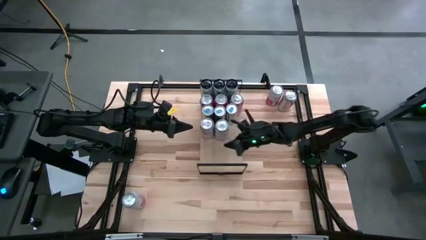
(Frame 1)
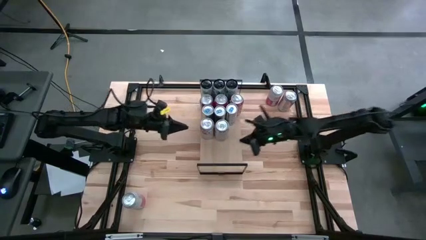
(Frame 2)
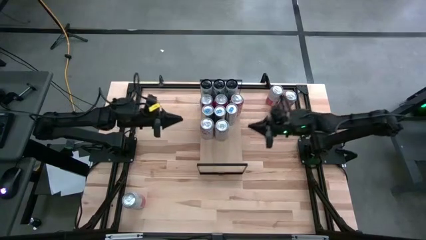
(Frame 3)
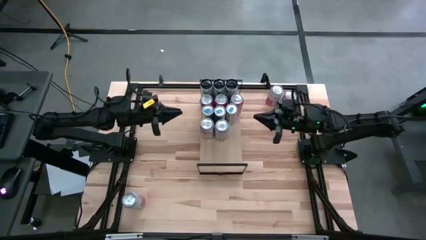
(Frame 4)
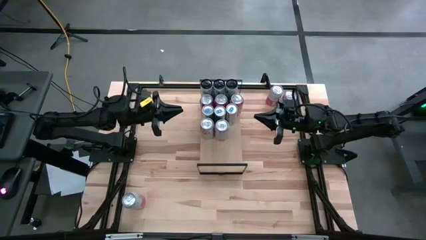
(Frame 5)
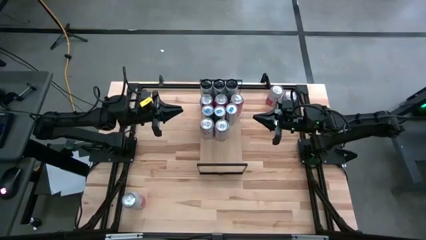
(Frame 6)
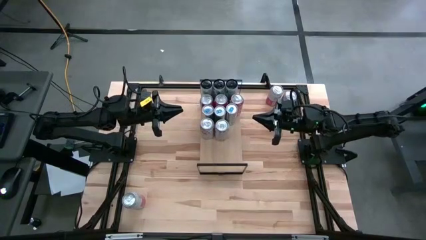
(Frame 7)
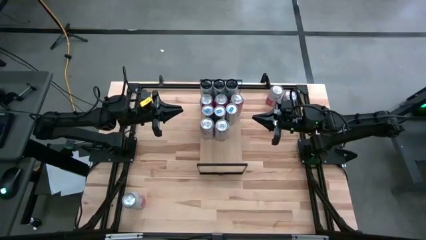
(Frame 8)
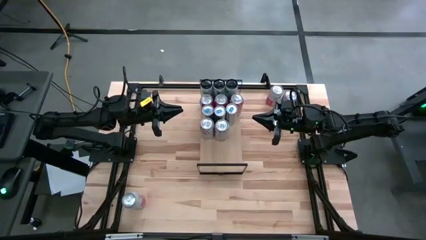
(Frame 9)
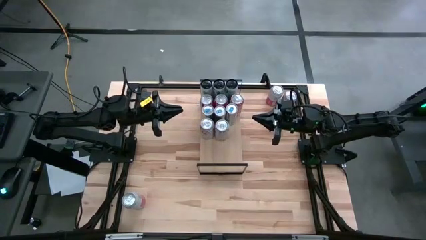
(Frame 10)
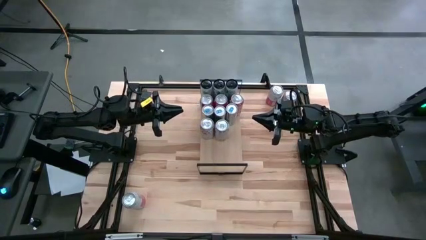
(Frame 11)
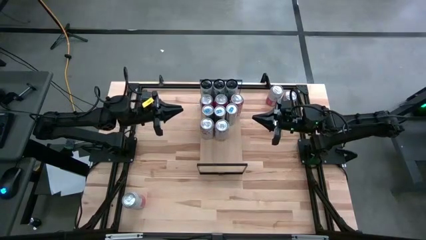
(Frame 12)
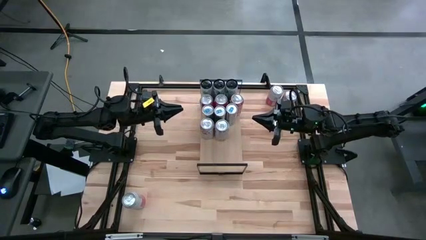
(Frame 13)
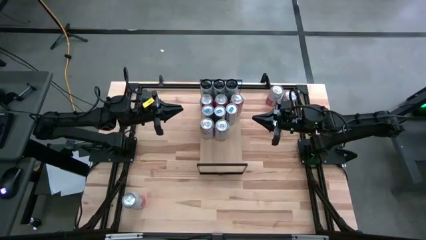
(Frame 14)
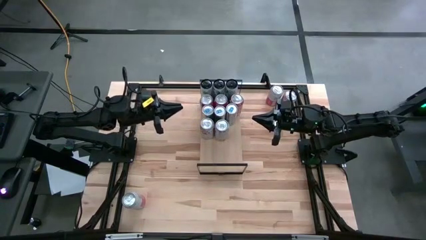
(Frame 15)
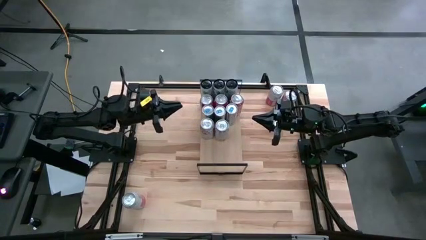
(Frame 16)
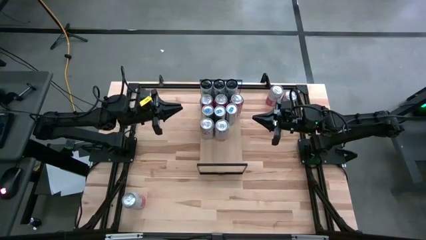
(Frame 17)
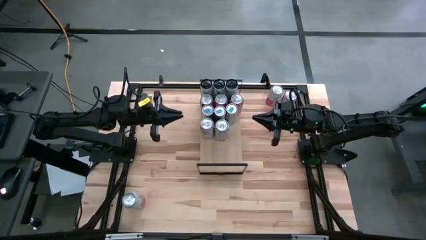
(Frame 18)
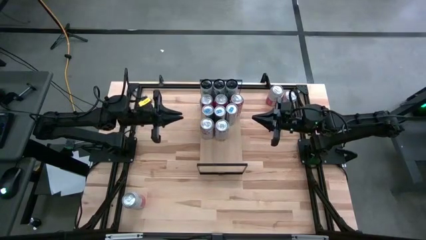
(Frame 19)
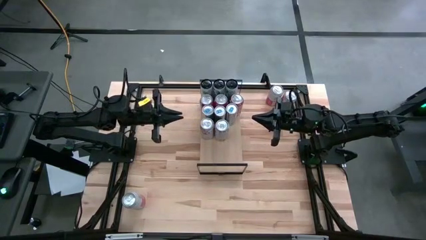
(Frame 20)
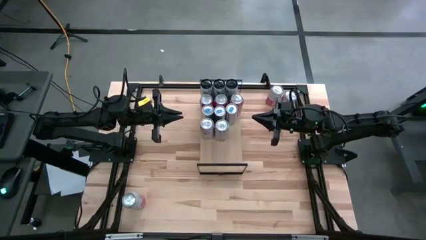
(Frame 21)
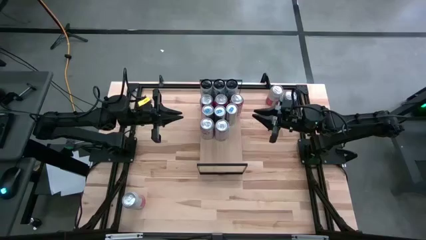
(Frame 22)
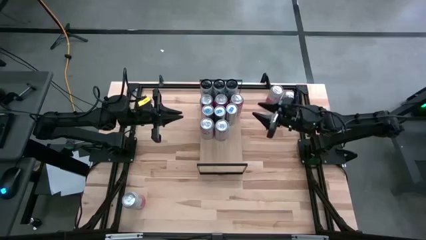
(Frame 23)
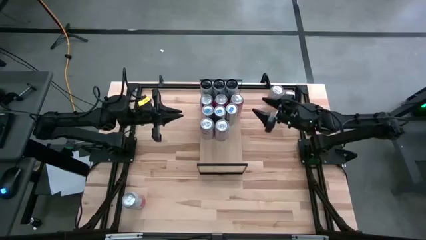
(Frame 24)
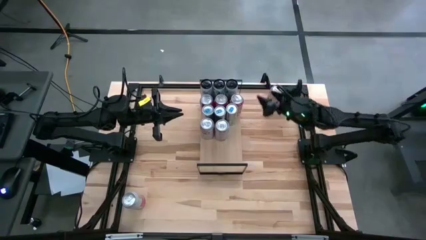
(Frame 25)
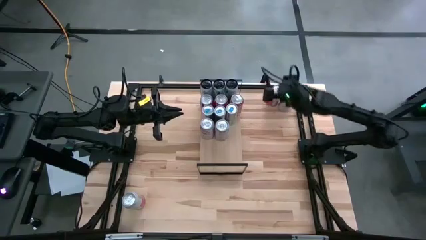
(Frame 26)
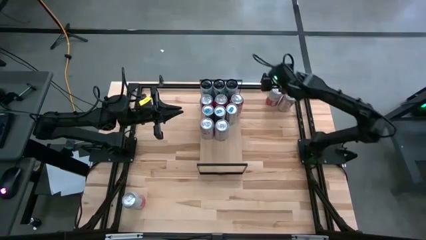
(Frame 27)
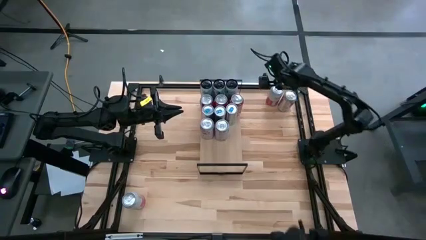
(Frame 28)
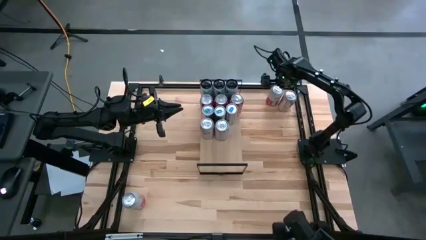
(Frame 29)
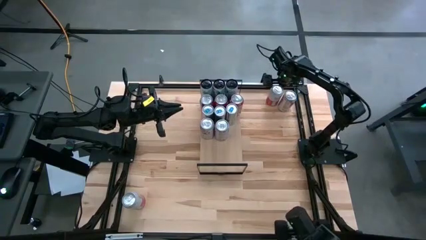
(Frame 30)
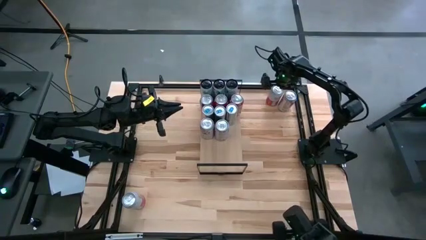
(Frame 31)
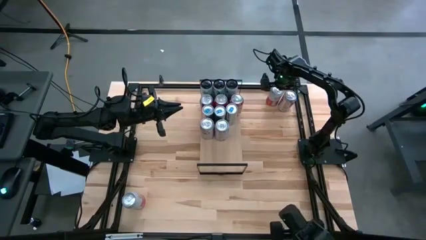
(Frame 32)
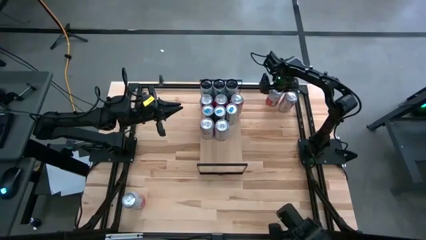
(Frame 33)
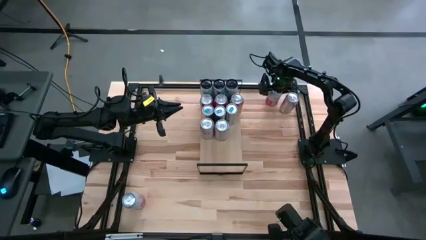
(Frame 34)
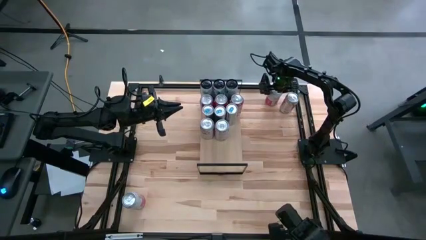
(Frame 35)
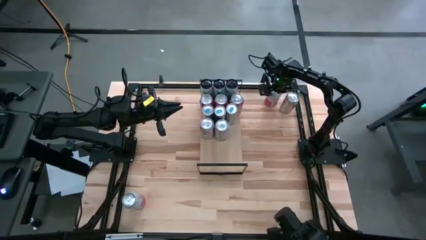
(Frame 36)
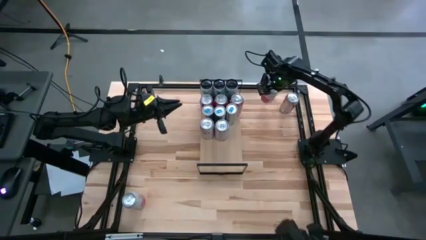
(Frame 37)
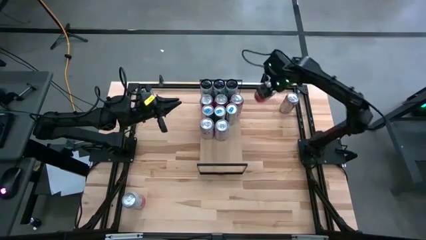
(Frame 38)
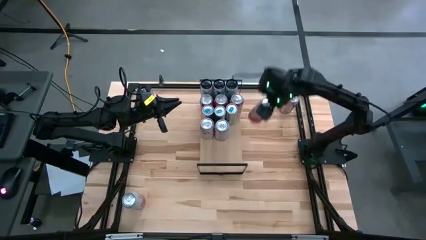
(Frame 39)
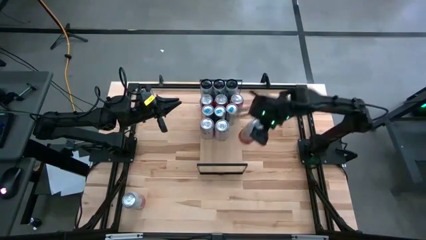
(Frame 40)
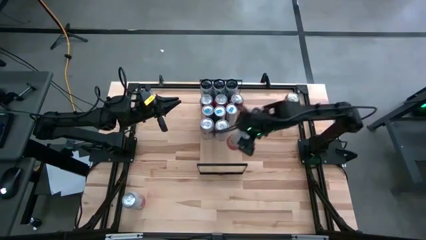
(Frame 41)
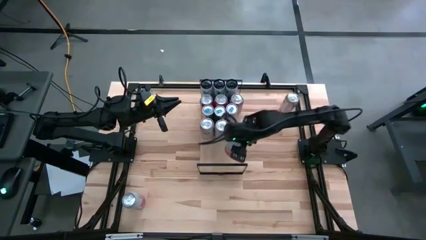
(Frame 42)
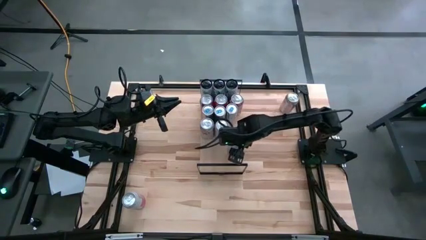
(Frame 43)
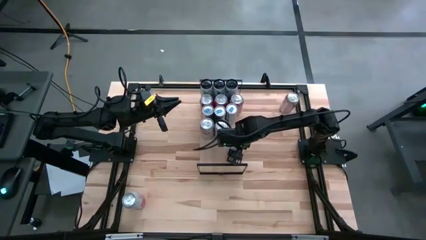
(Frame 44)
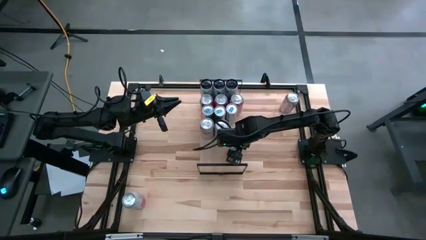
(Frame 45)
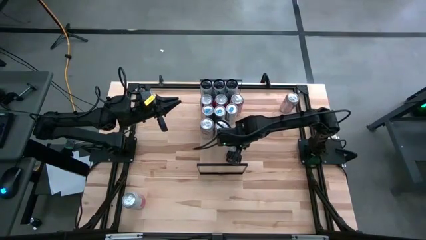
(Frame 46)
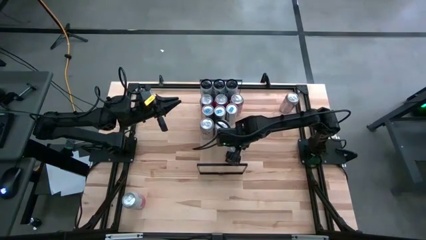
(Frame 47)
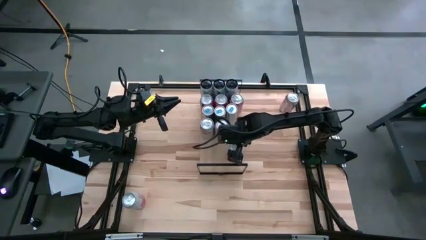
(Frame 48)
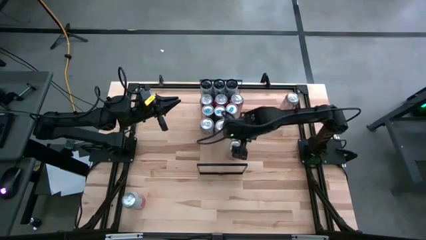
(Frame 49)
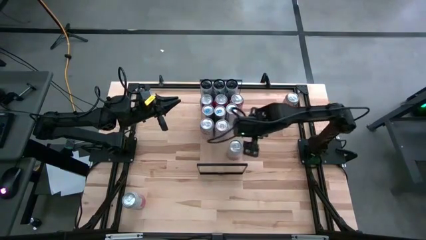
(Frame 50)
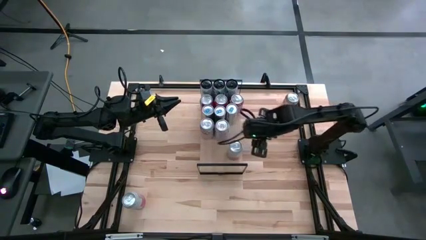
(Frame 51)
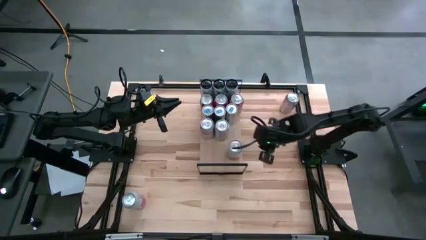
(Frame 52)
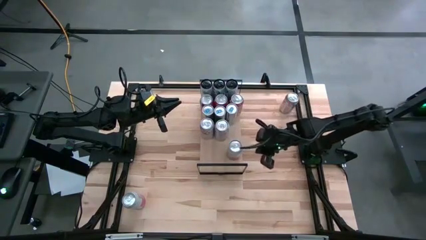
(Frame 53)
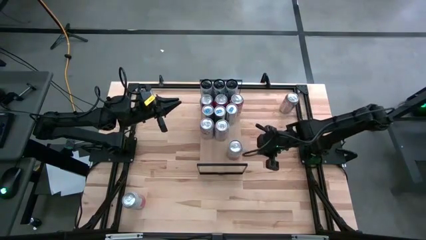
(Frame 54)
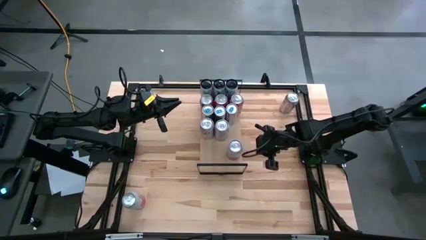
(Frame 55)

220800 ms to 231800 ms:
Task: Place canned beverage on shelf
Put the top pink-white soda can on the shelf

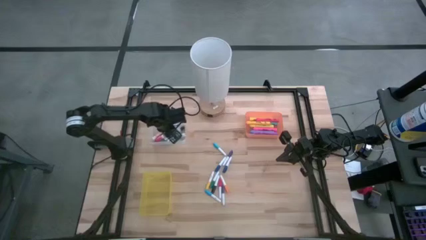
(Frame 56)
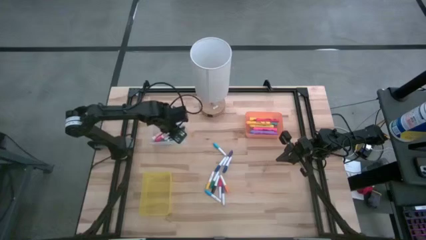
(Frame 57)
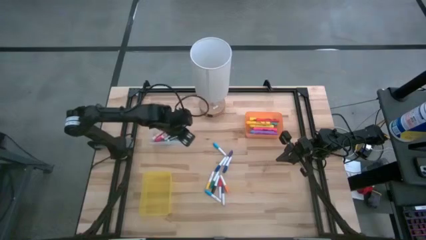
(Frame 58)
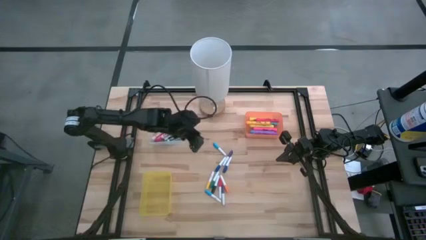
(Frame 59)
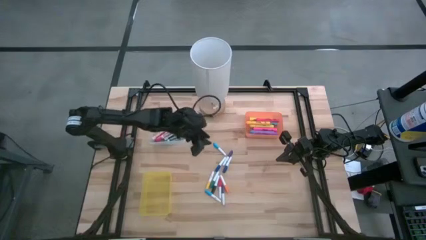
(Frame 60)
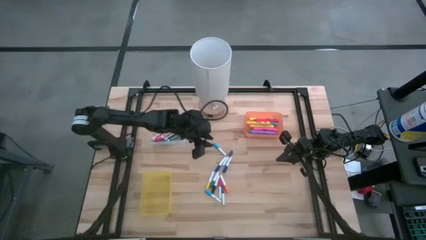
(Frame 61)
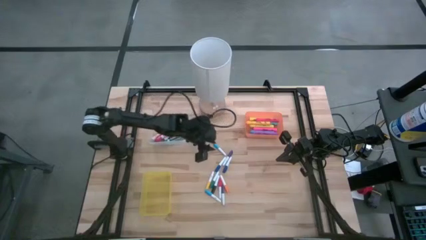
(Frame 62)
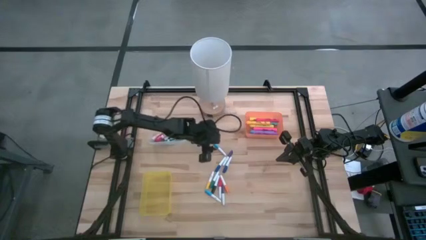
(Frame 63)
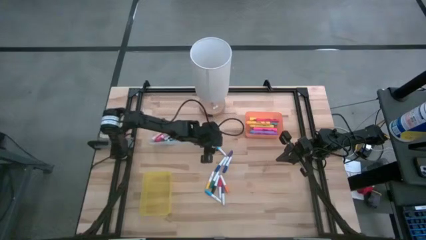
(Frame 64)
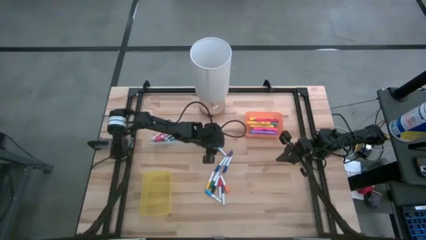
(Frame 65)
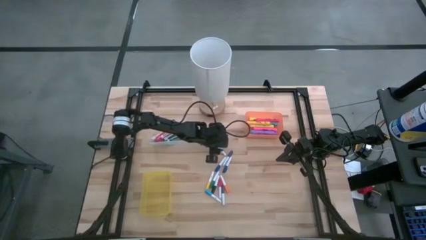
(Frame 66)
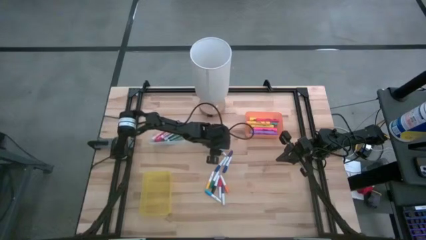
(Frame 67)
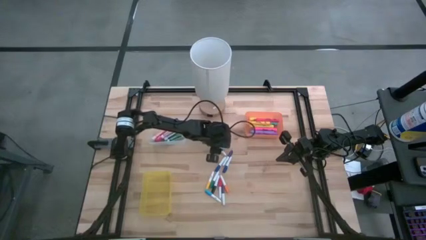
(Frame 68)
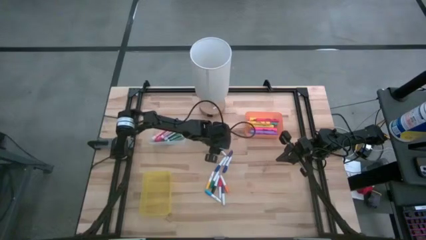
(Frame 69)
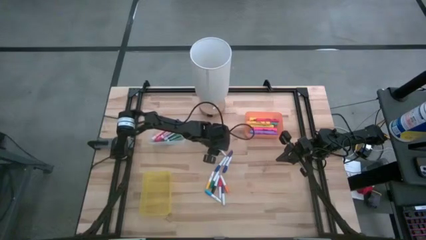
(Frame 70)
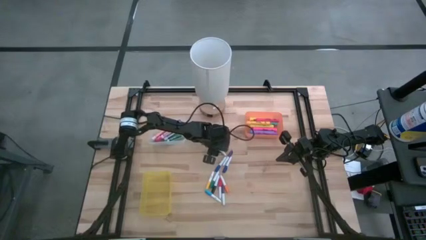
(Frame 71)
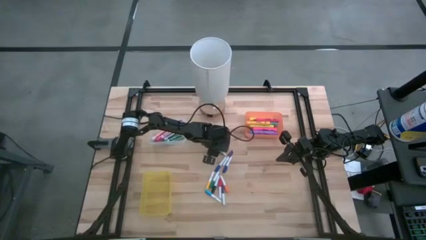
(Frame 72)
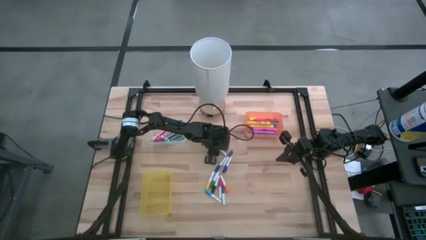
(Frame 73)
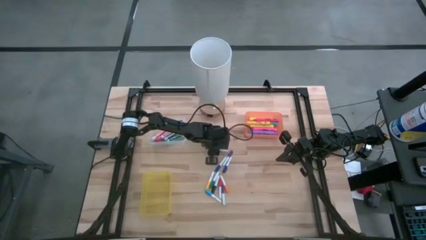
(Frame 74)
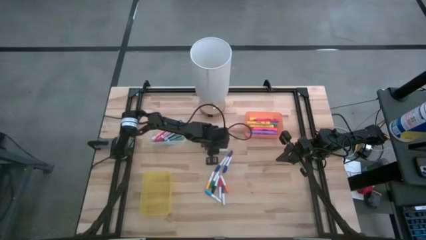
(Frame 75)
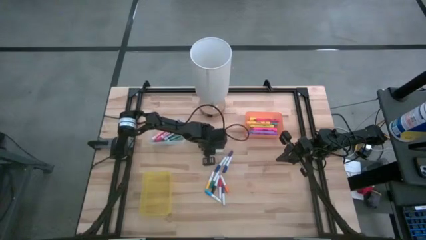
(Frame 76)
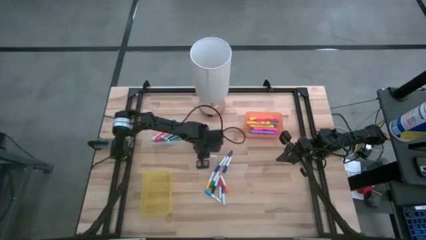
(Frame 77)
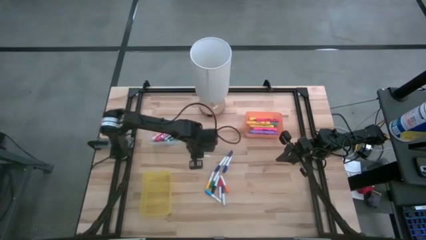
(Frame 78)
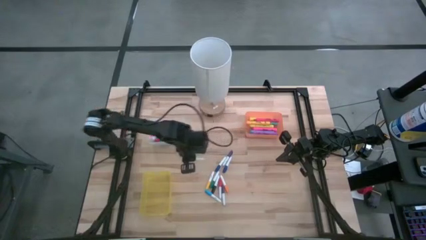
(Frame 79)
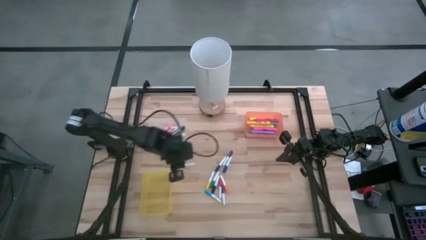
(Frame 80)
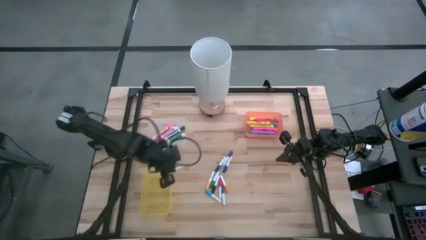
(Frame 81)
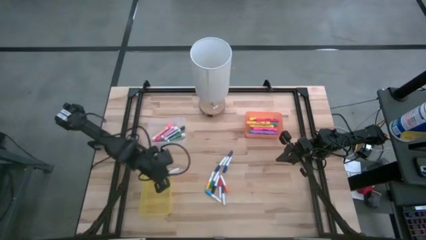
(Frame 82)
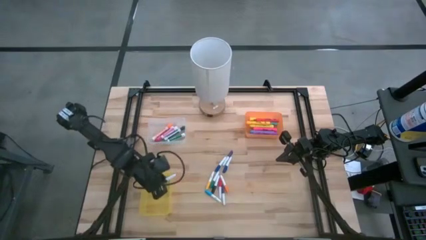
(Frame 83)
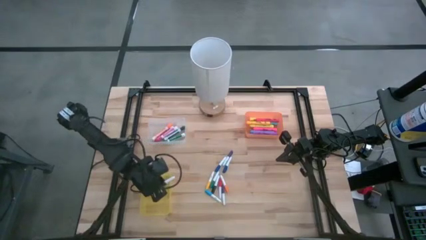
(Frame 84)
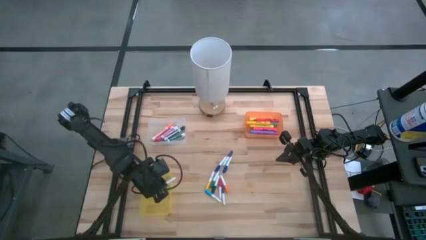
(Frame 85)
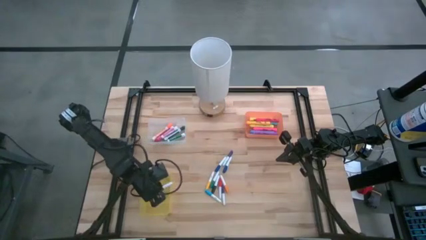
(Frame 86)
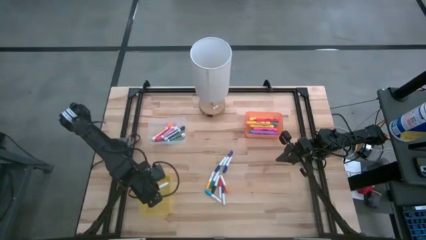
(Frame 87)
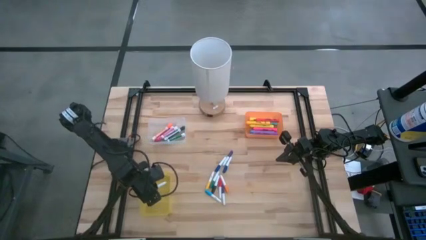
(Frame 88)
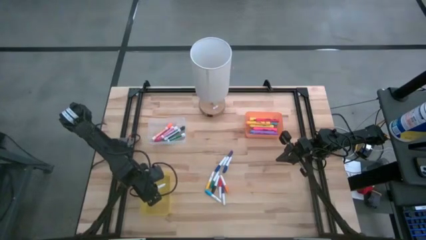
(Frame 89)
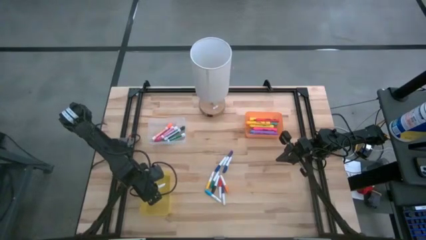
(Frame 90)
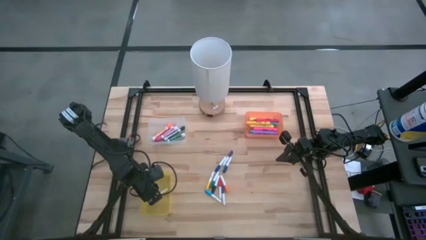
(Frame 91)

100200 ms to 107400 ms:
Task: Pick & Place Markers
Put the top small light blue highlighter pen into the yellow bin
